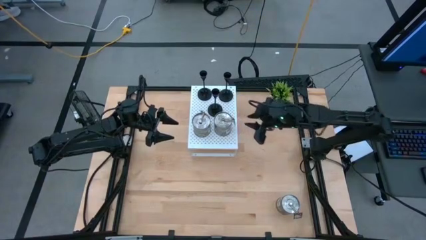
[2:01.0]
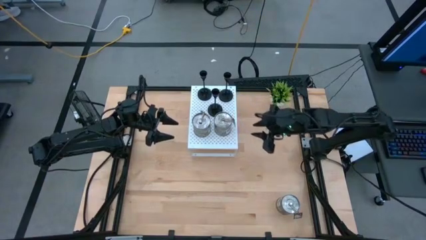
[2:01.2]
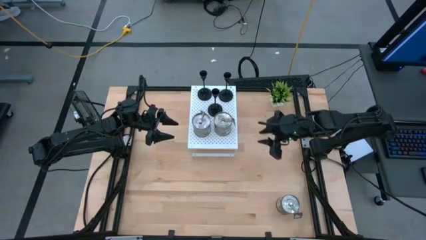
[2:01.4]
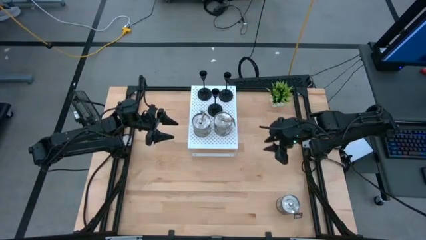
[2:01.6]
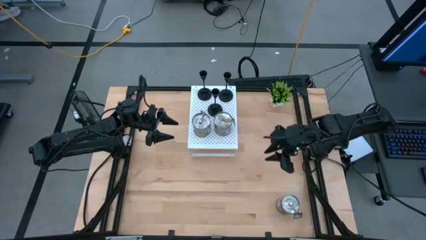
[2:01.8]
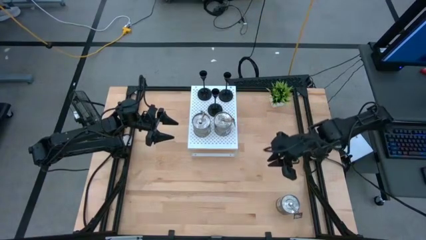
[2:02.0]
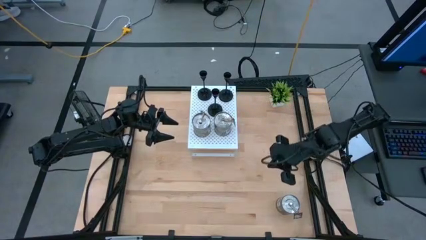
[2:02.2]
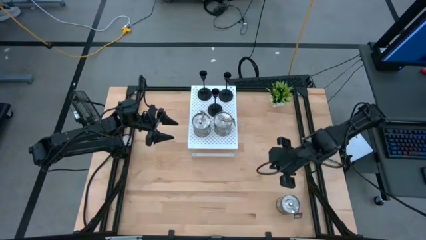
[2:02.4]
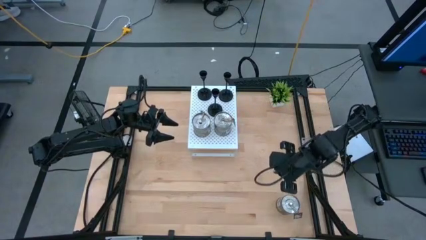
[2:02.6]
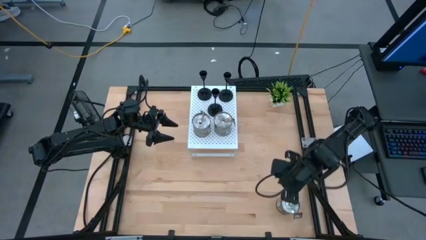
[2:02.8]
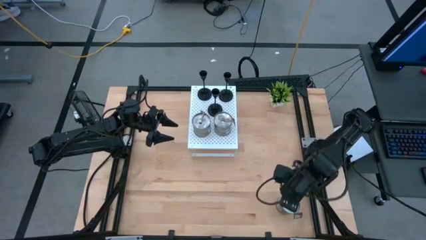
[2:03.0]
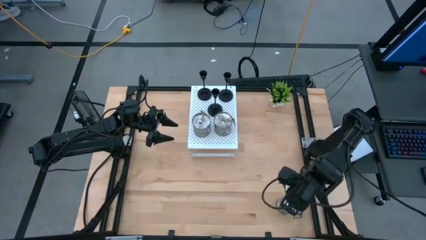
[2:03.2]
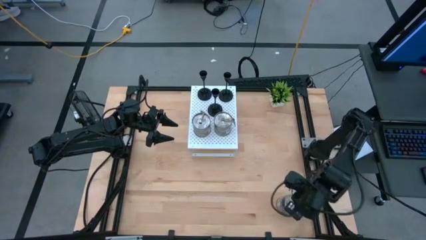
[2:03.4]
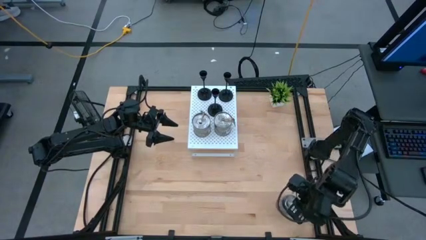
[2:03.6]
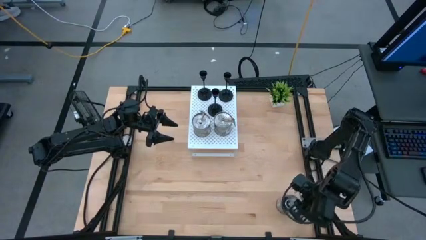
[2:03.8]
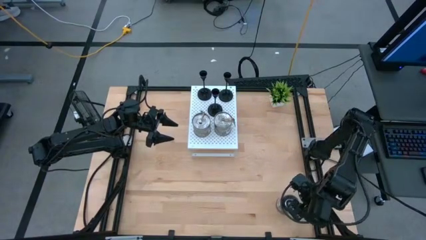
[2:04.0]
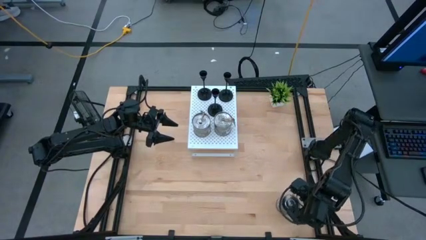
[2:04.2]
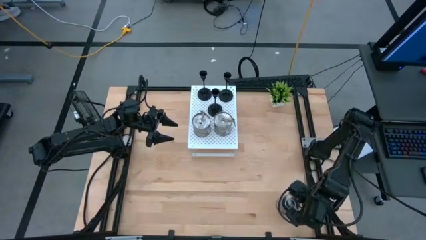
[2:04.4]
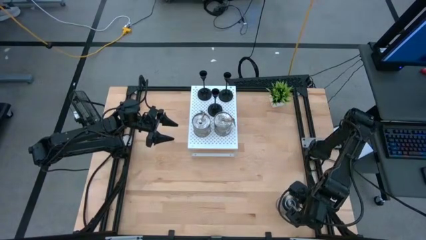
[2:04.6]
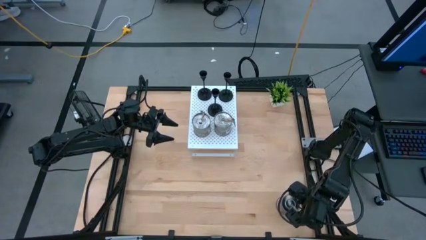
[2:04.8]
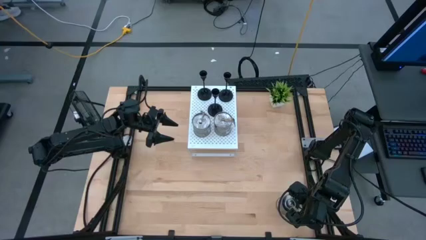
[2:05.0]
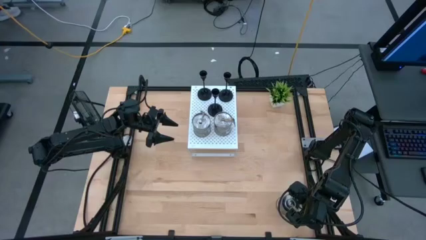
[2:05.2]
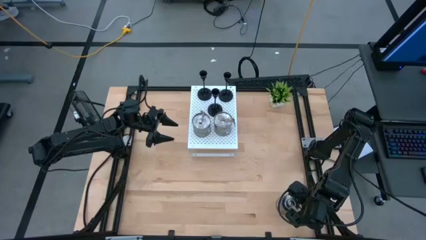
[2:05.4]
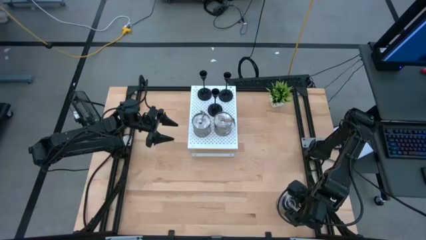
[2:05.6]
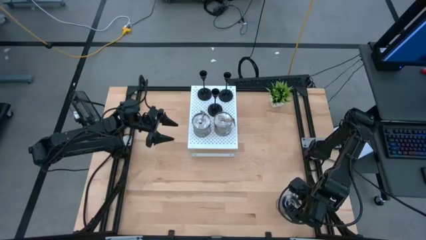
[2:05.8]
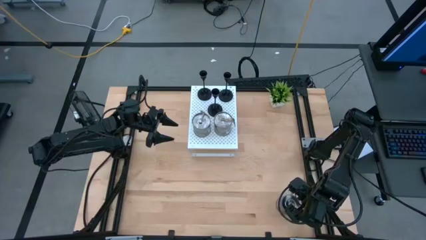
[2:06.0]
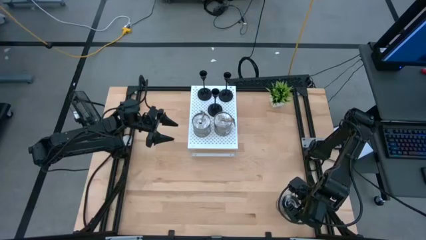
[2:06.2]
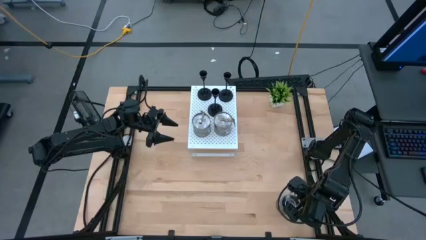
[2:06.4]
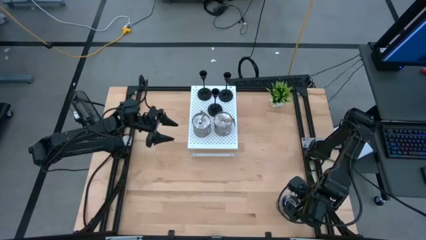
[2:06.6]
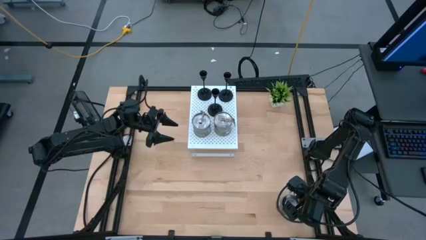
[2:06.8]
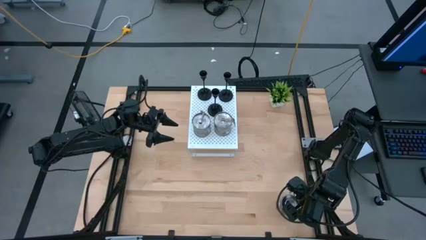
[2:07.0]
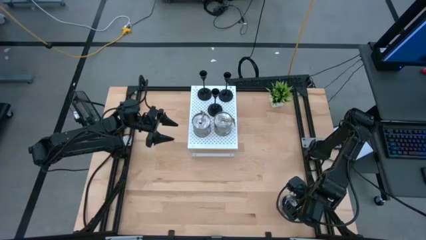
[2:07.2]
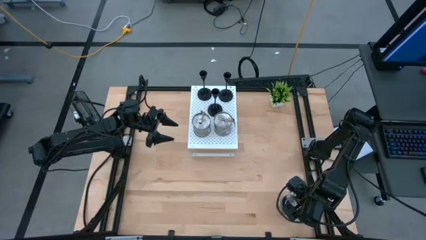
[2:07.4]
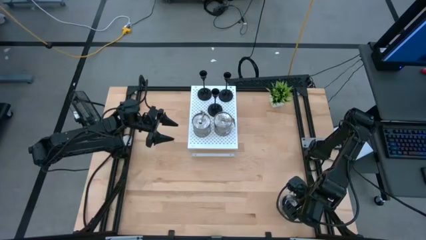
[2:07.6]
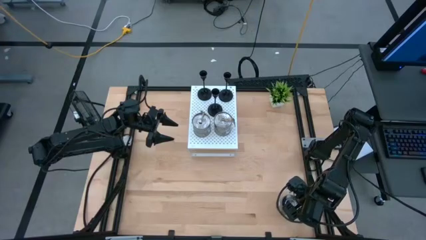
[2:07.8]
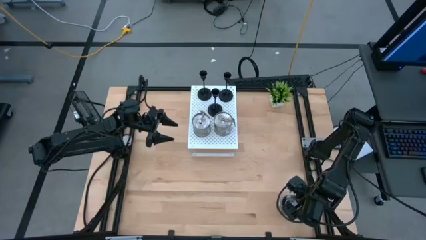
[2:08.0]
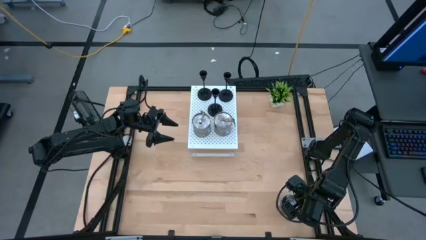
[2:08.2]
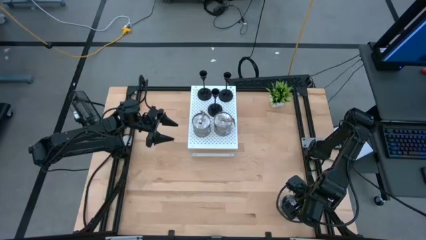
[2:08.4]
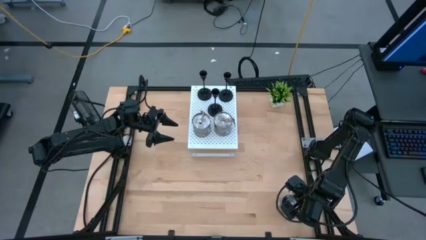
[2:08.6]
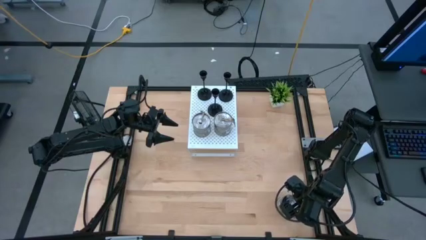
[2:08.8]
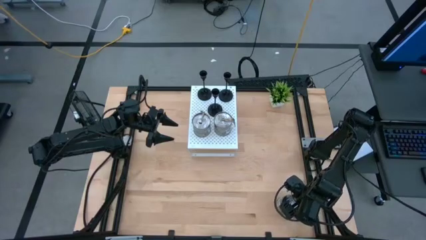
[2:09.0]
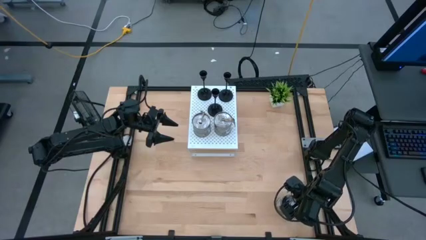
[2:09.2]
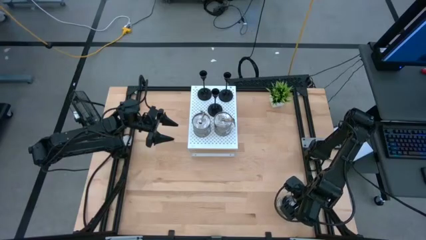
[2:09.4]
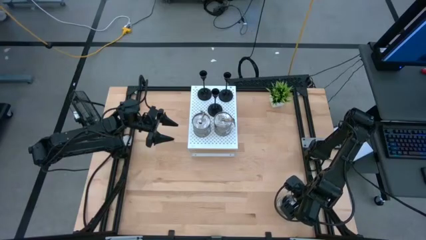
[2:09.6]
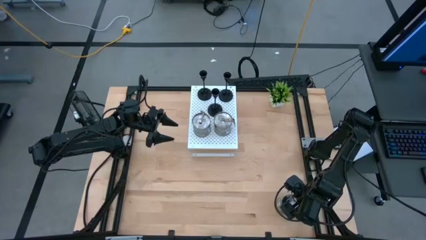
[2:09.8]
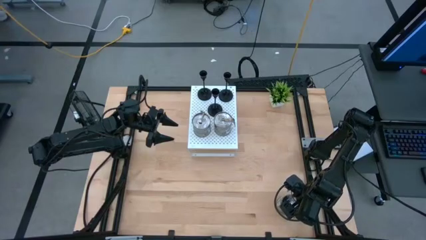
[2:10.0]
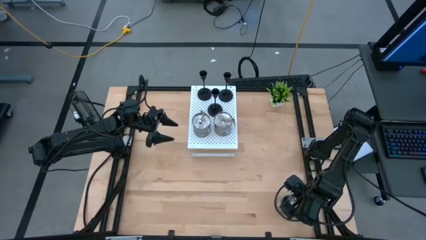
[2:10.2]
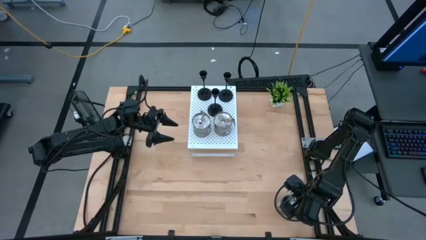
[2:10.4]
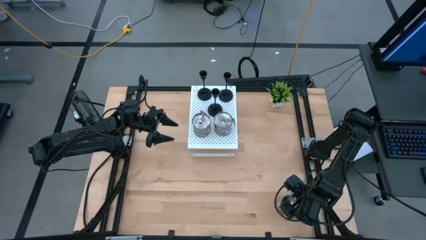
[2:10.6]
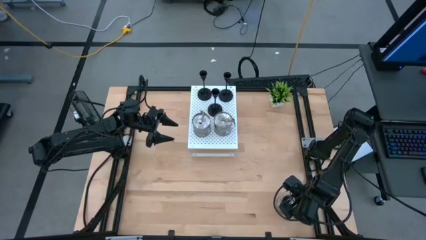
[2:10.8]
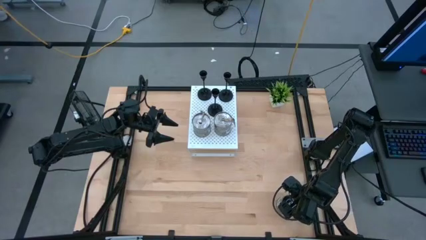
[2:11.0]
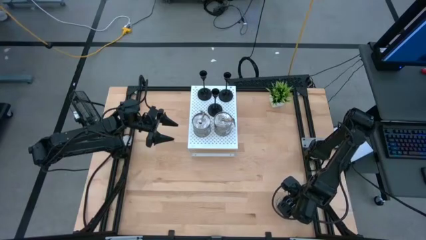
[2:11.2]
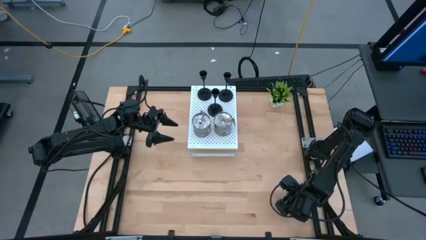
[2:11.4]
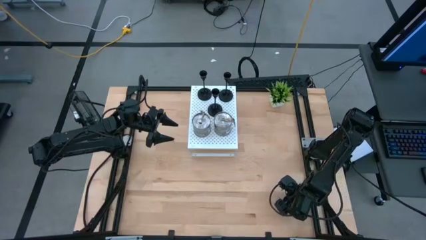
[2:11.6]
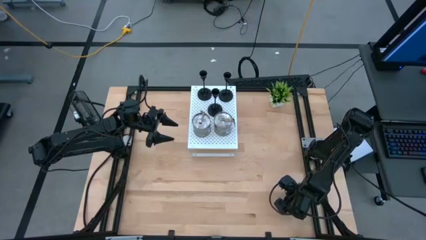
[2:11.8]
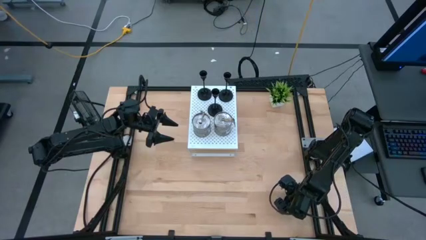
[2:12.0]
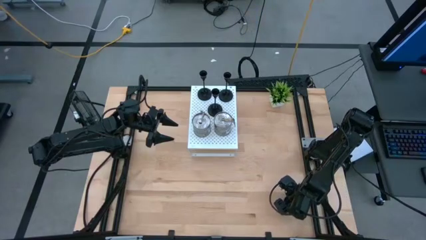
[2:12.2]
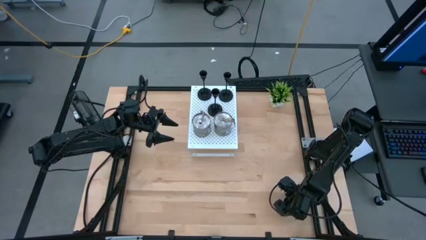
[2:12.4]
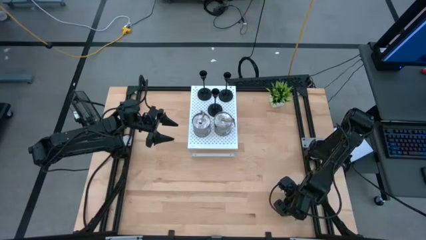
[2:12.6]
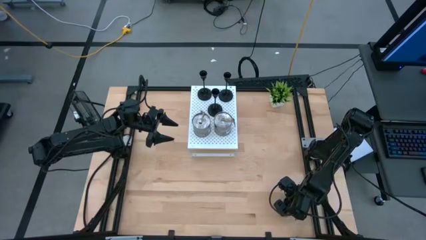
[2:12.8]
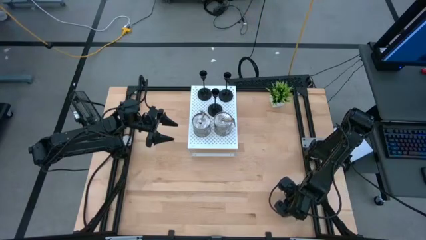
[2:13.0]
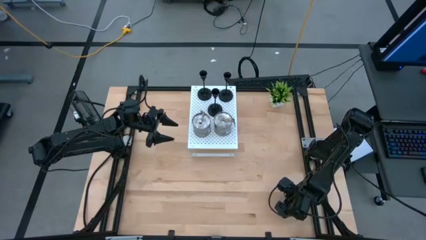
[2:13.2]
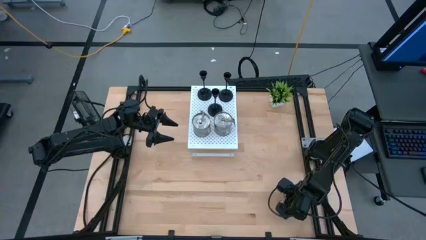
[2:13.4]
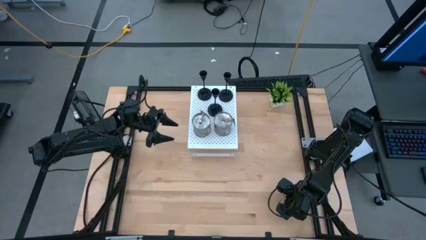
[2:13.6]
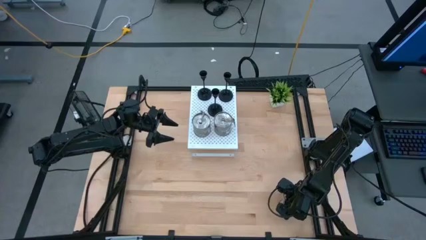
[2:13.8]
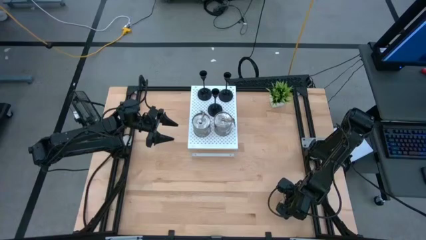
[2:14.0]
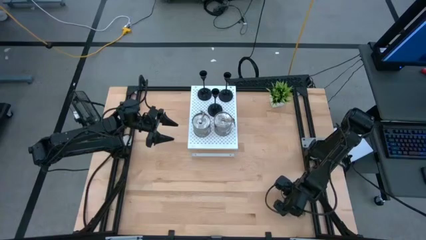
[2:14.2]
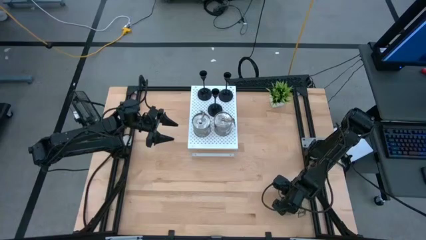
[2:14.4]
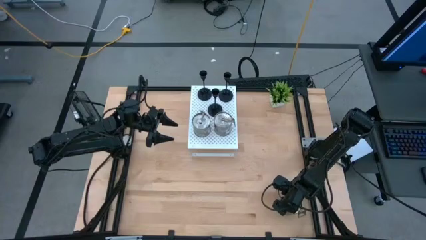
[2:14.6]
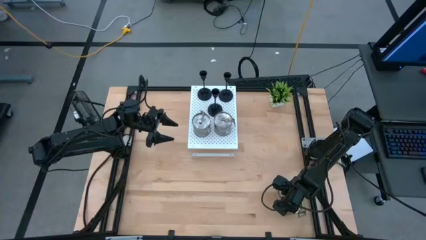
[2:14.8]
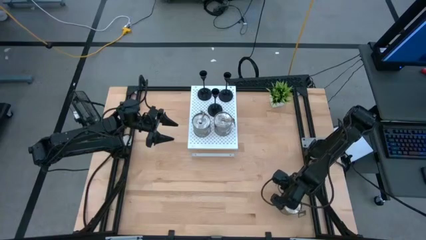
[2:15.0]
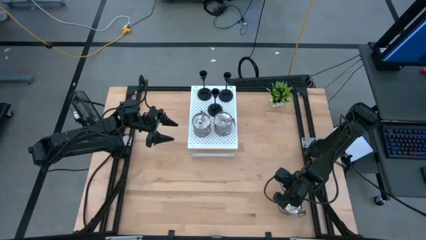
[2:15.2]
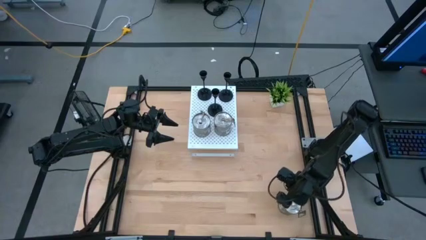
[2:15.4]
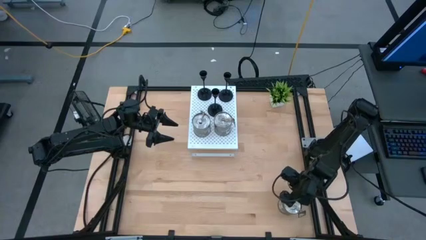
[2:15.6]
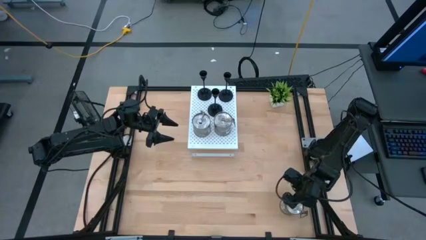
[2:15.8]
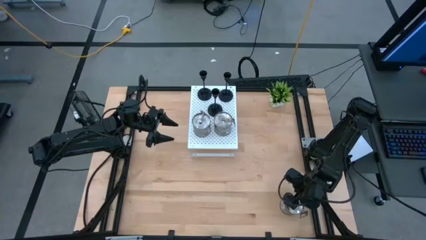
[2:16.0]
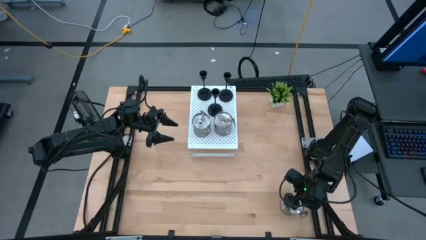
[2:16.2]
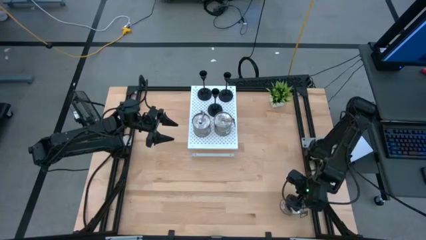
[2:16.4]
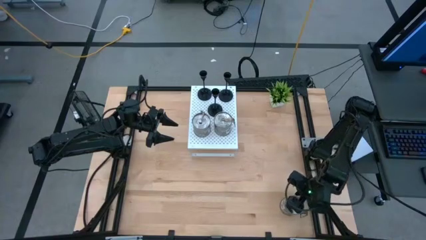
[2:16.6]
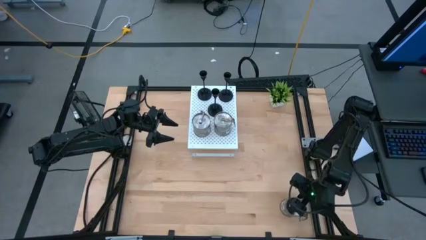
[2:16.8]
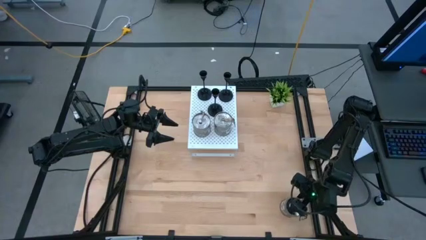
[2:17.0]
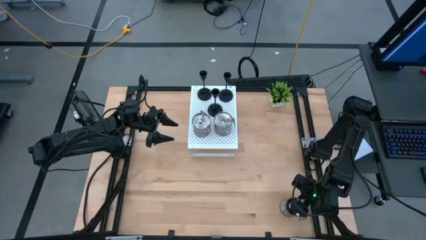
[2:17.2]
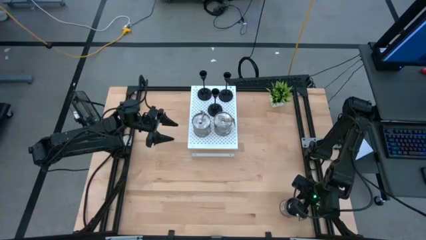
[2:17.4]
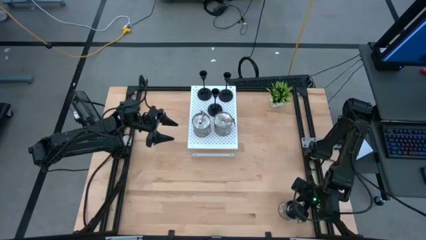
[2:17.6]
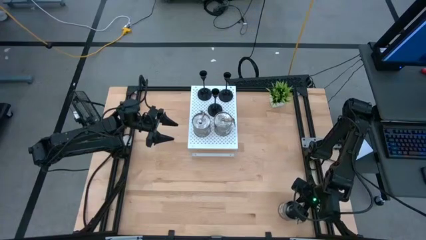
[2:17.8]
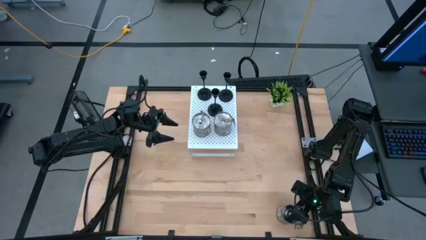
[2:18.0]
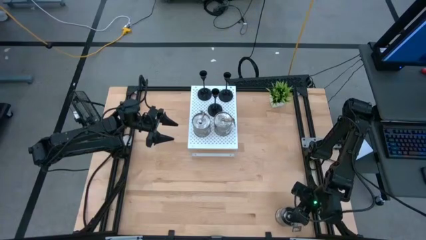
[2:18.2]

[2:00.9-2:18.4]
Task: Pick & Place candle stick holders
Put the brown scented candle on the shelf
